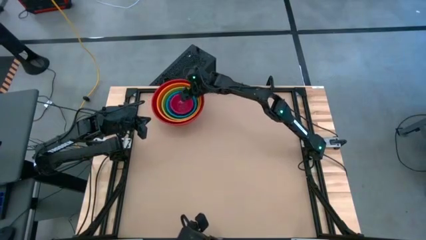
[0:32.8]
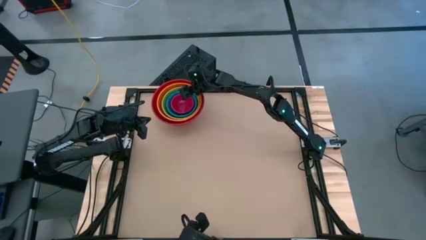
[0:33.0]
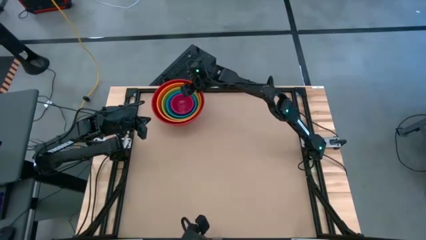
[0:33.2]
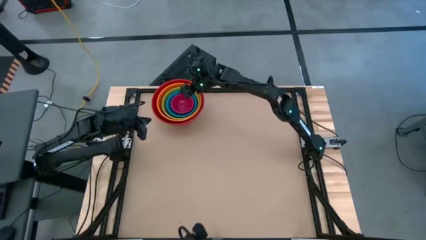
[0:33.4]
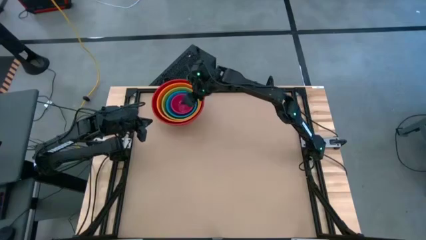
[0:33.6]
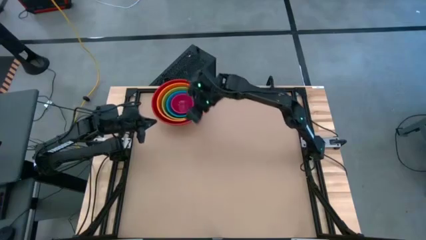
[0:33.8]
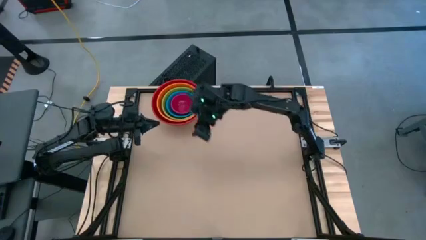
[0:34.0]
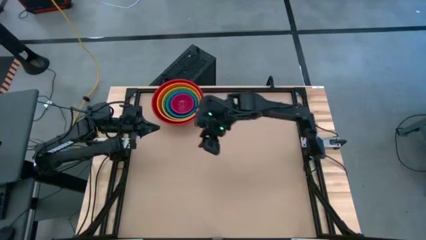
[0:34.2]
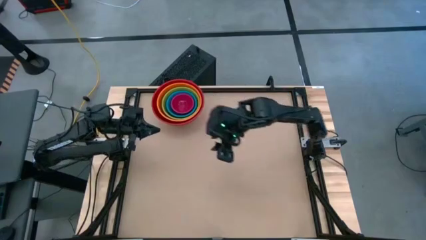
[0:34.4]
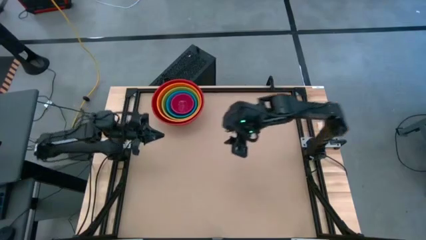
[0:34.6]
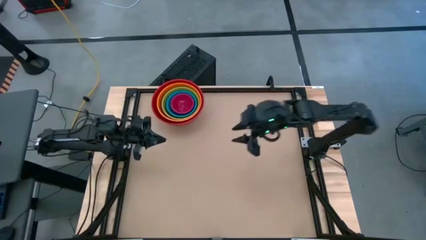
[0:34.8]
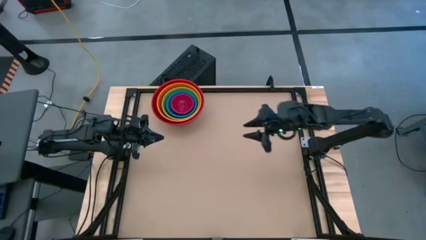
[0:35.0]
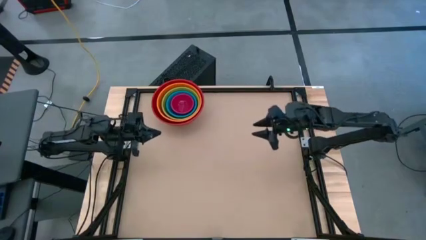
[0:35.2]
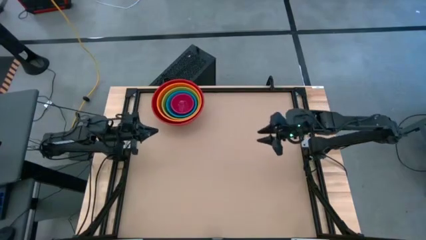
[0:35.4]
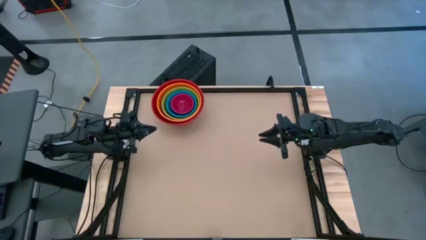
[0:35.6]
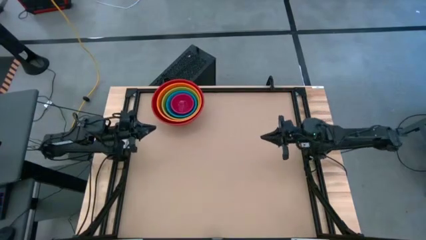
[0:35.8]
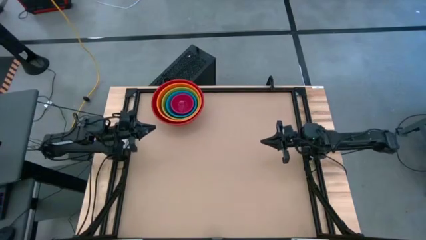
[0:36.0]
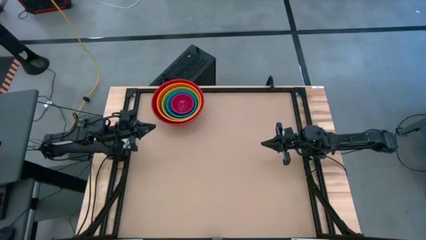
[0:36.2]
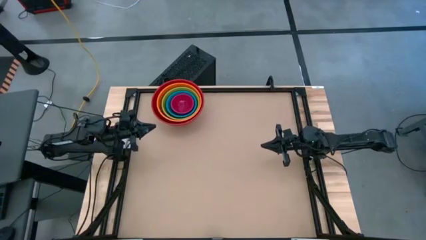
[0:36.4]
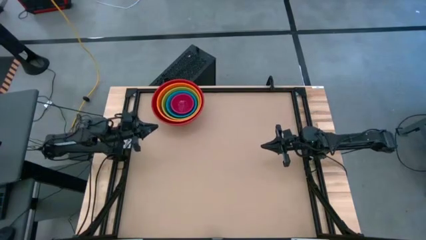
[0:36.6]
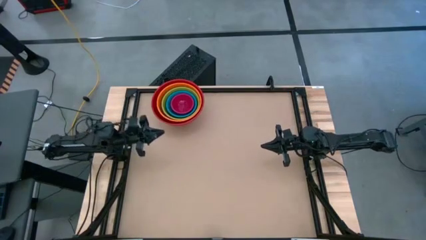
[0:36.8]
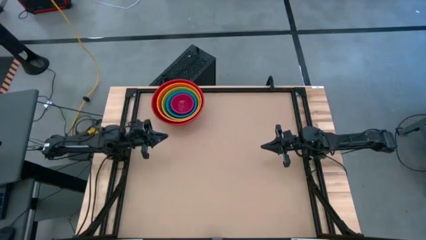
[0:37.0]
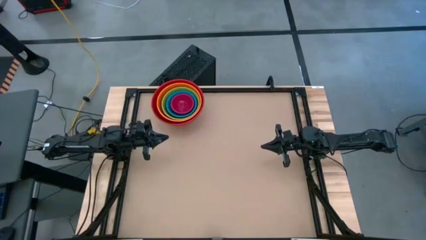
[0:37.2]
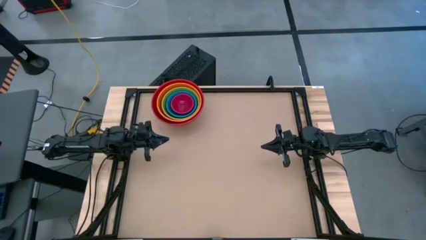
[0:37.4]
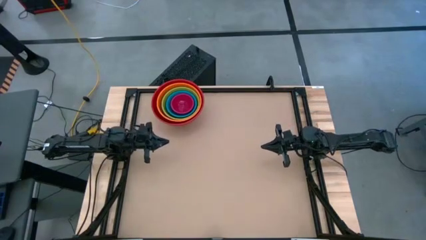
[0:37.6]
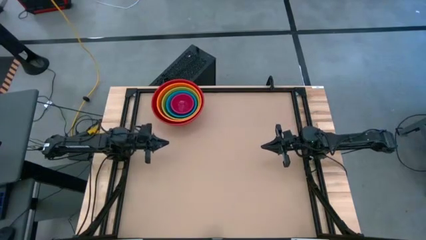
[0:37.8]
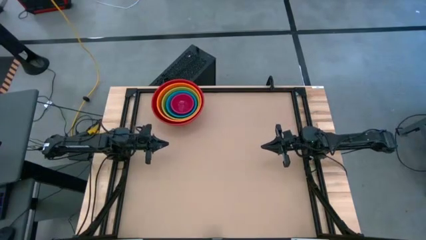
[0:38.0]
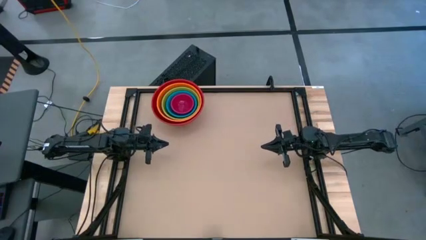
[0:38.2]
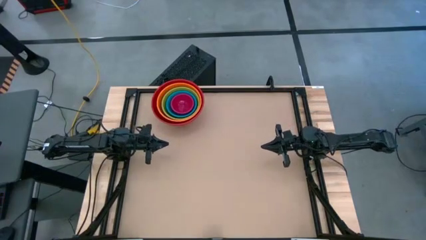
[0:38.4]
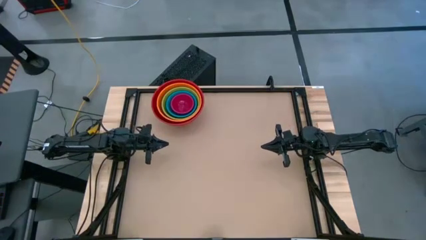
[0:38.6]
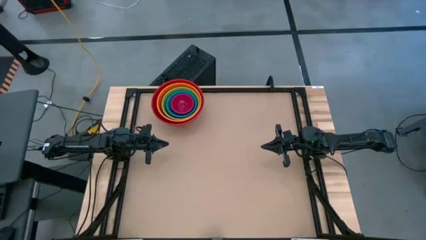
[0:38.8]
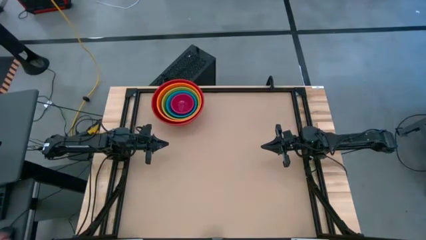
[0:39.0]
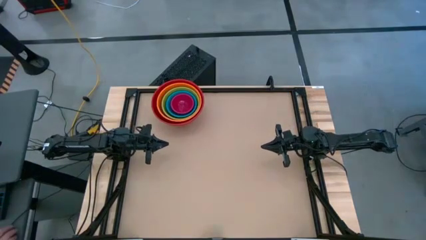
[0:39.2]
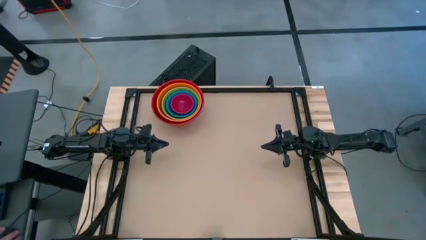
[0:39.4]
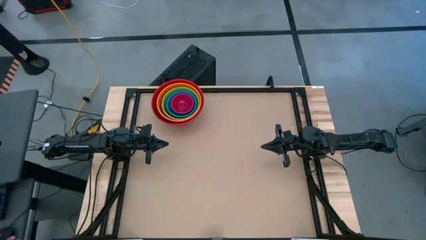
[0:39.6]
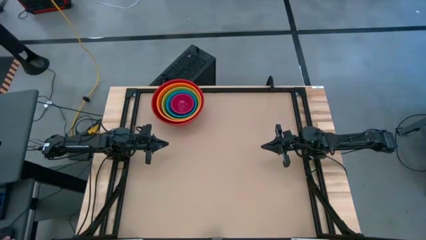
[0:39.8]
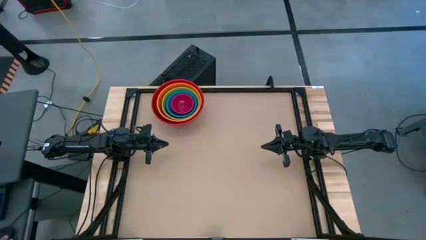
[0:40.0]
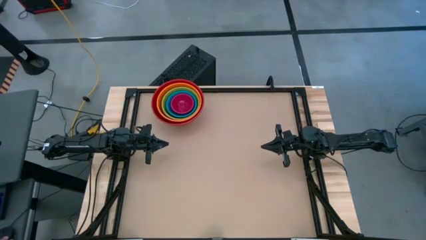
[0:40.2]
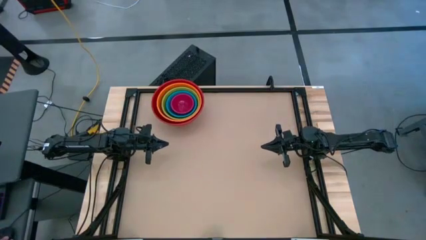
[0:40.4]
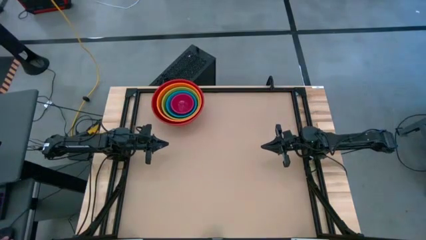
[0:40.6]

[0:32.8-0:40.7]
Return to Home Position

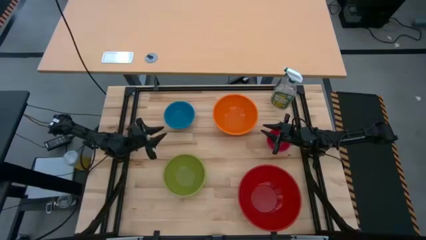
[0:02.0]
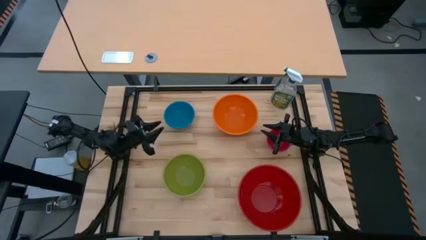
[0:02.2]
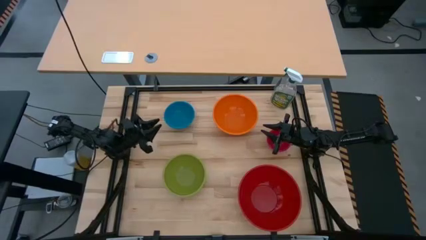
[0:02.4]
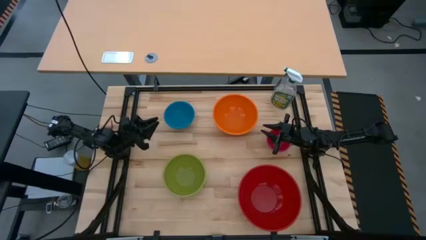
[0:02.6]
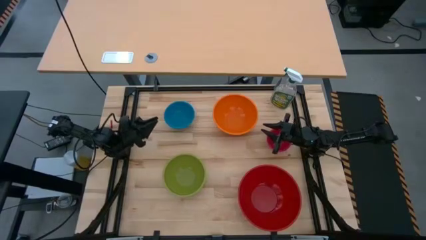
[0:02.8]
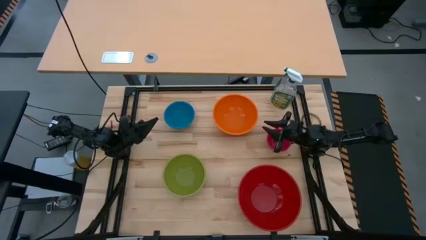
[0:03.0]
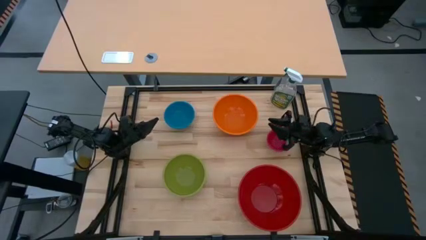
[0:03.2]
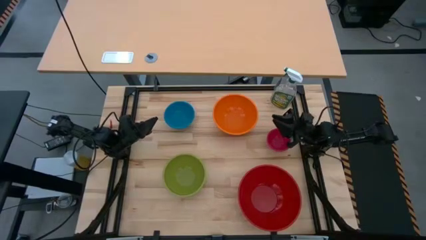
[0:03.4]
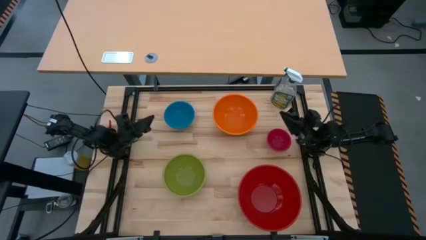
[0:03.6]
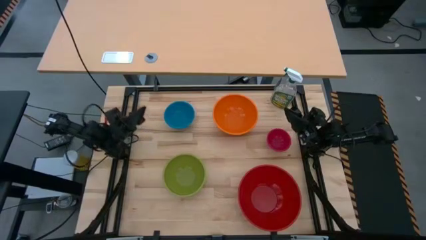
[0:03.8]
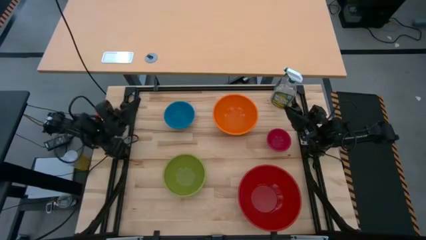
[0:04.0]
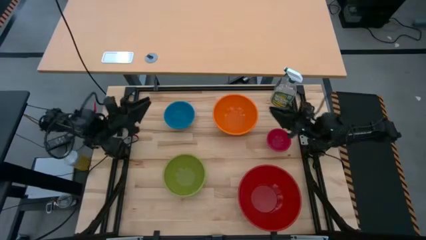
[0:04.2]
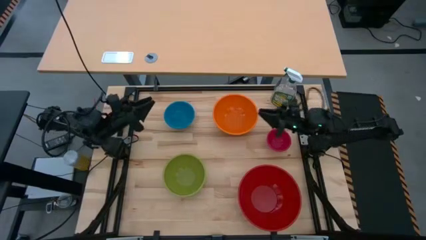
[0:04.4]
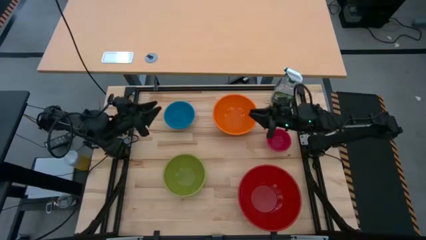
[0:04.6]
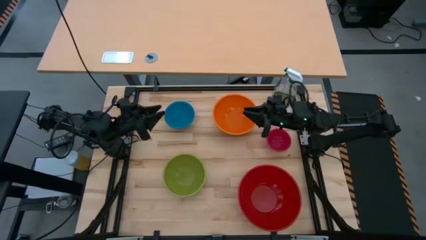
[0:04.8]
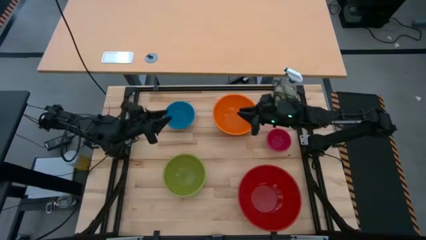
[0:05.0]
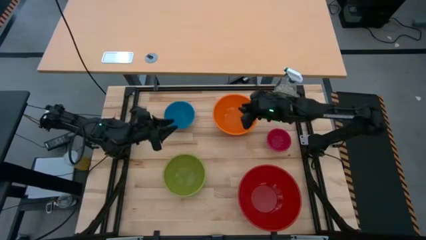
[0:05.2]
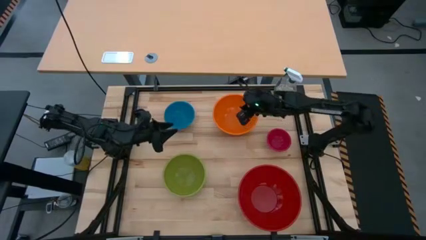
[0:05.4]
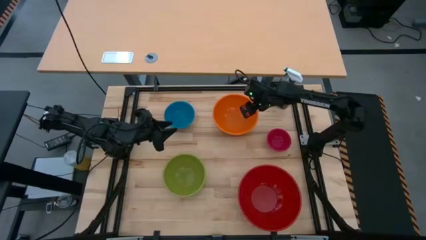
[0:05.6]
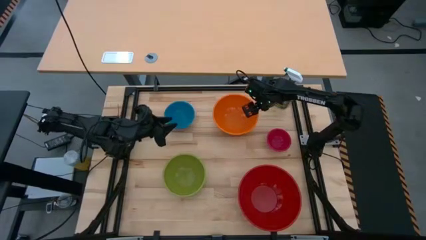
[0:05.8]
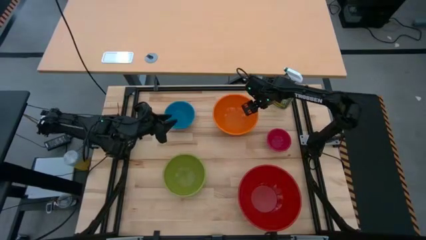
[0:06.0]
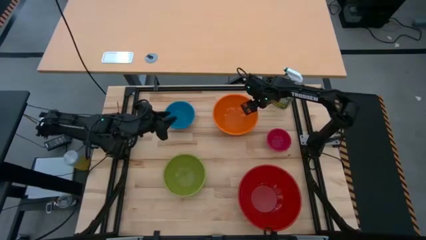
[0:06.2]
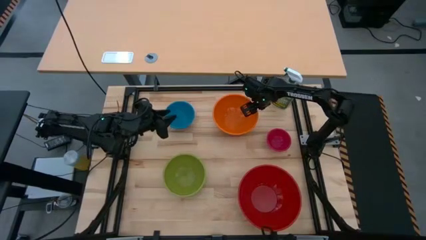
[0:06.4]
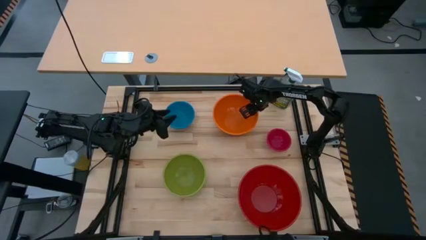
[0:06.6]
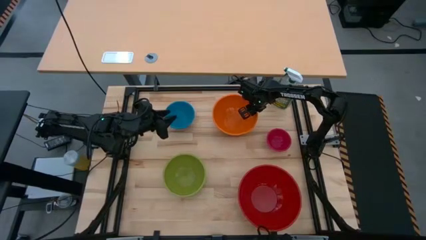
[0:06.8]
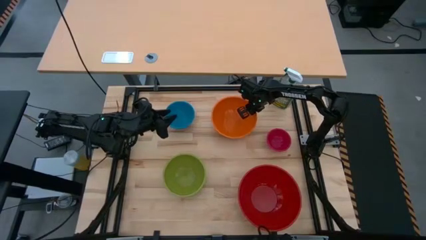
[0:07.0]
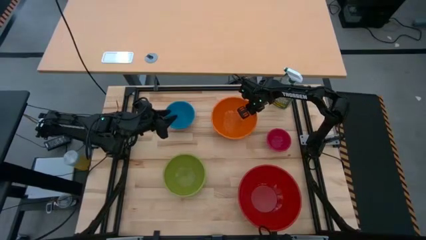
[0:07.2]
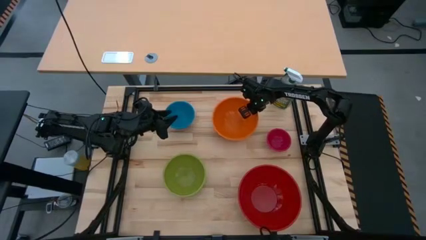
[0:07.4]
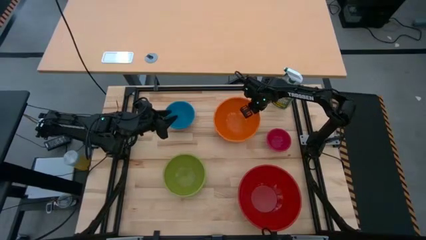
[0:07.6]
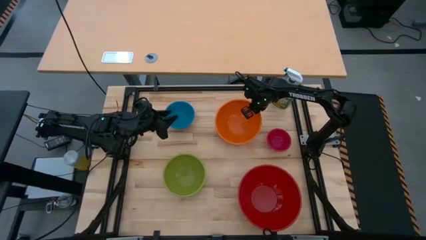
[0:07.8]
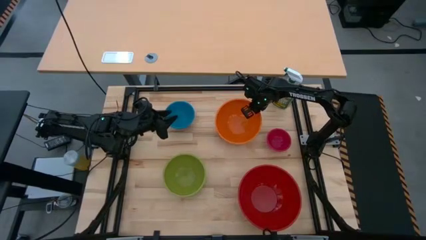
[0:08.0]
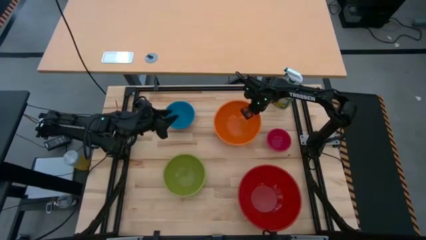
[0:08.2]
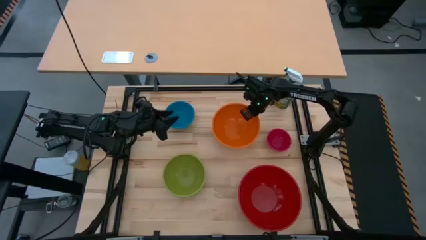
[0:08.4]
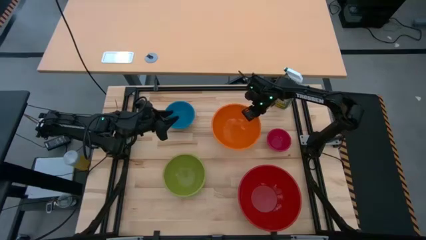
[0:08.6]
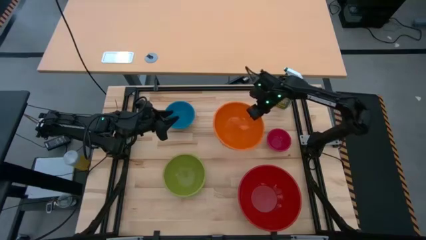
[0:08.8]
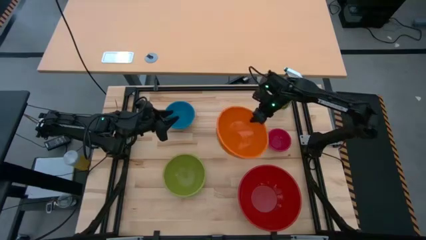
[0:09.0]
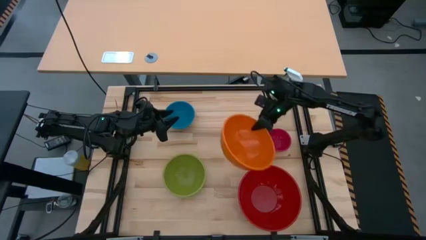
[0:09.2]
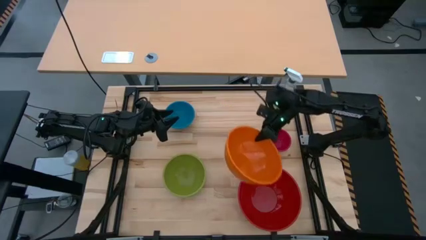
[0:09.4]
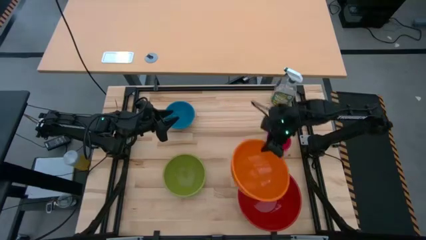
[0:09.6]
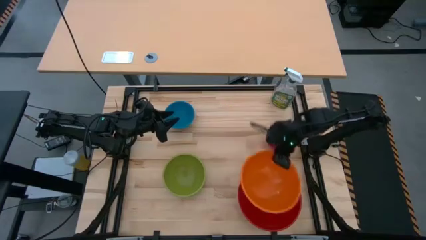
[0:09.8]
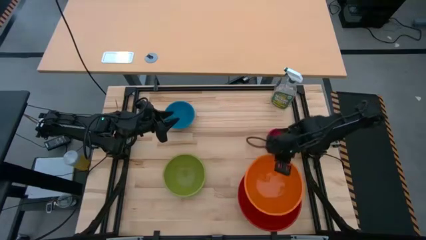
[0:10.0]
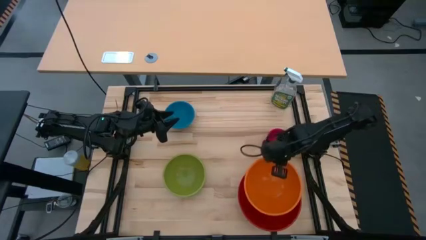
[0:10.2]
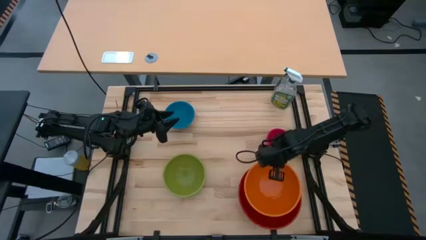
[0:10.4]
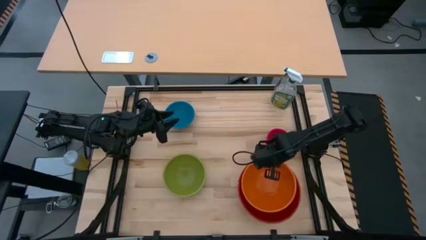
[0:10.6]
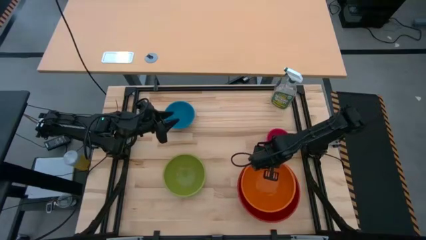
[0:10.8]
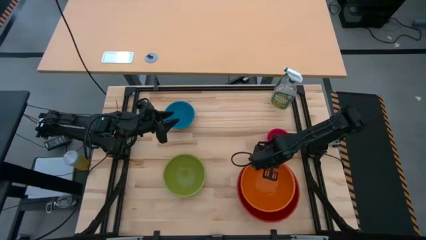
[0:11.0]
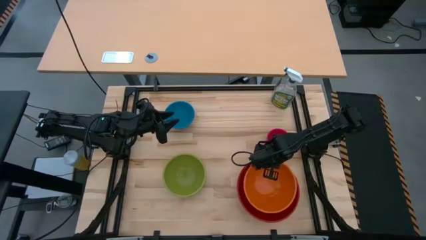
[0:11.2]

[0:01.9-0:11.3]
Stack the orange bowl on the red bowl
